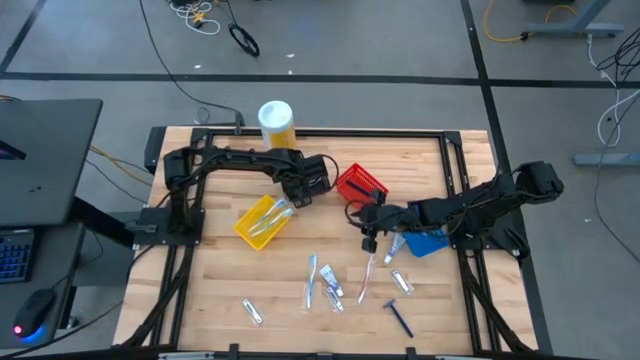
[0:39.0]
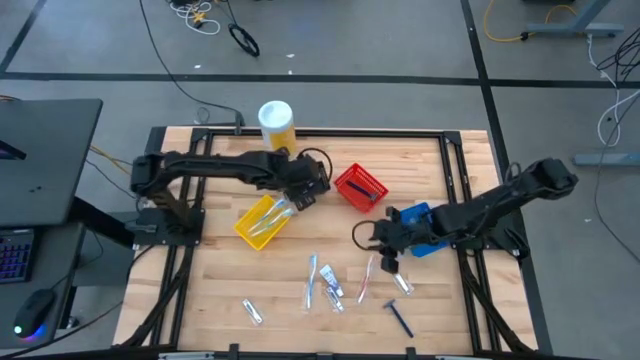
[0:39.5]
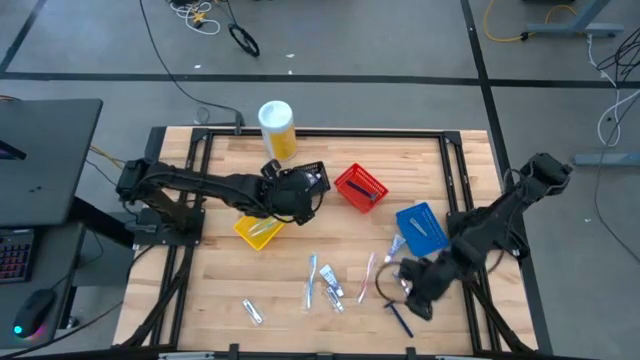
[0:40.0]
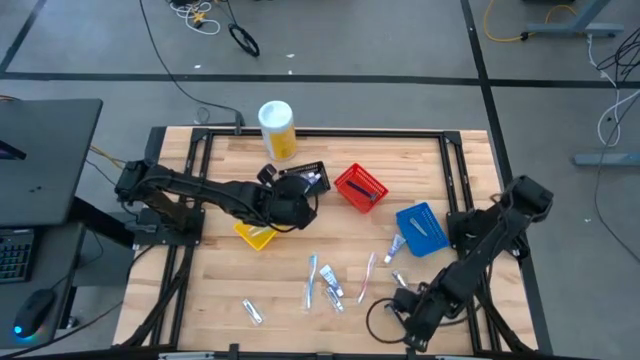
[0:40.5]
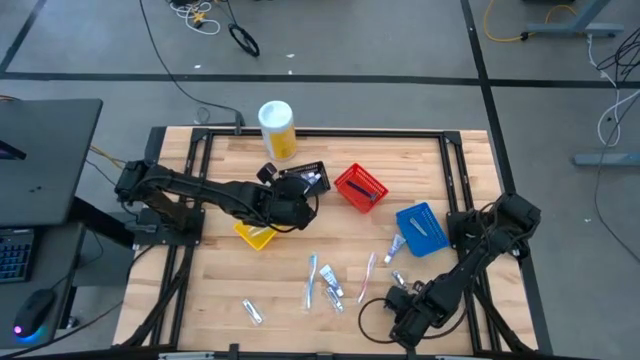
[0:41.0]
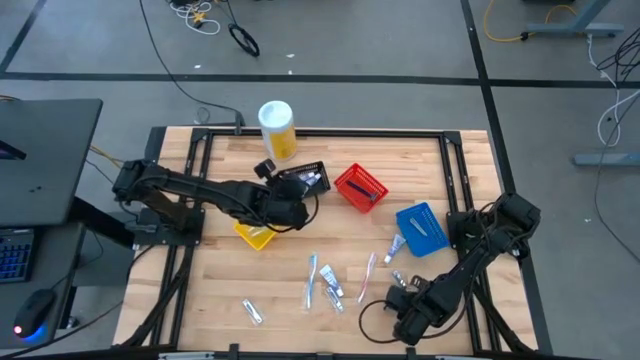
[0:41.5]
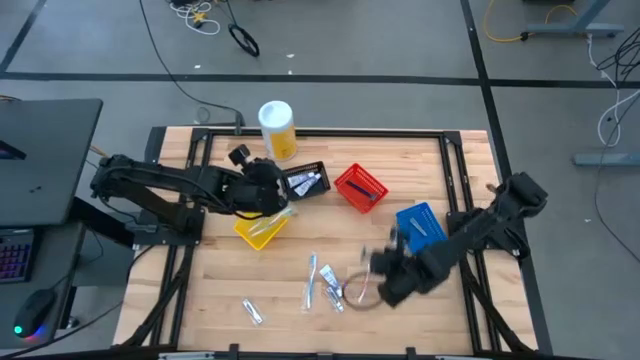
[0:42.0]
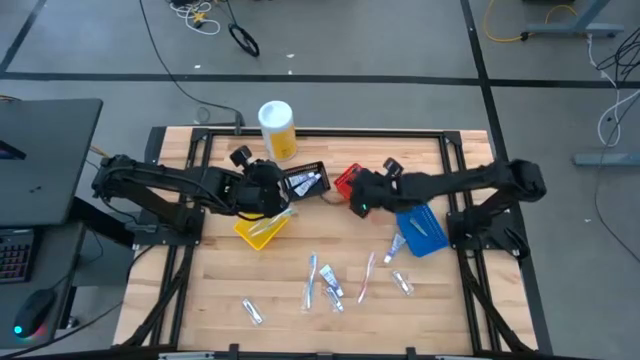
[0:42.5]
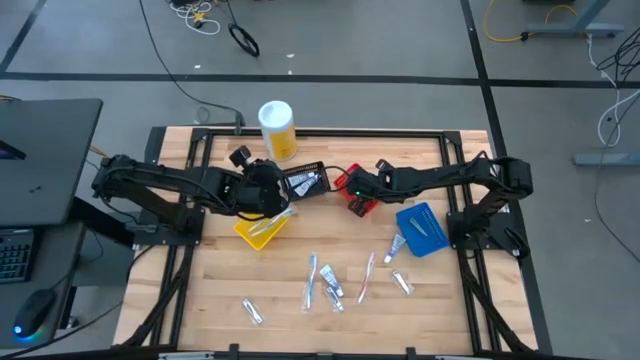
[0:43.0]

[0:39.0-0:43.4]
Task: Pick & Place Travel size toiletries
Put the blue razor into the red basket

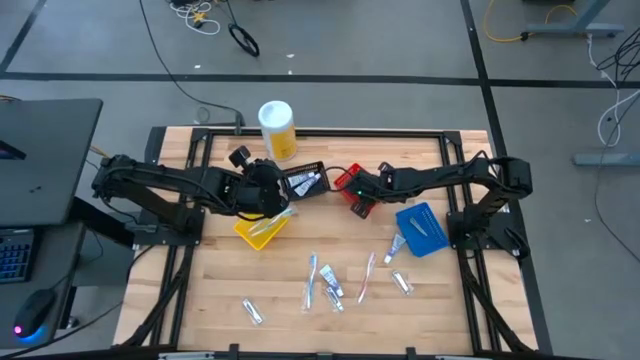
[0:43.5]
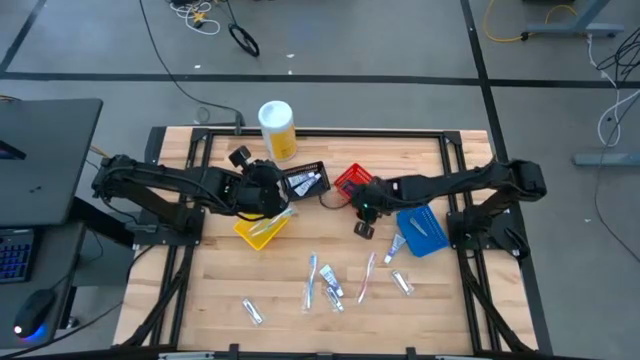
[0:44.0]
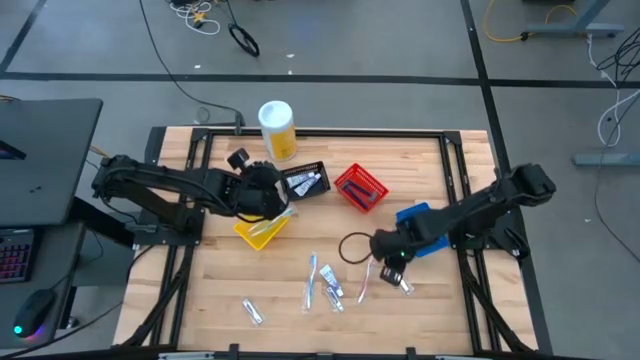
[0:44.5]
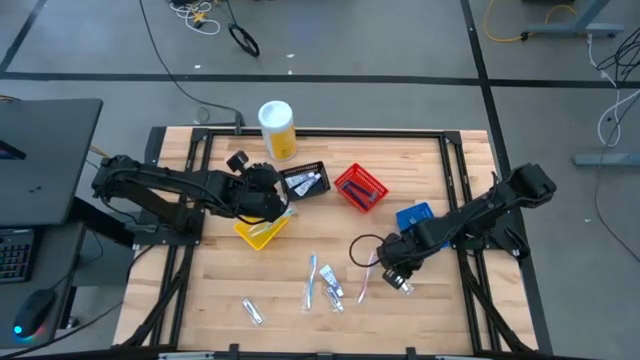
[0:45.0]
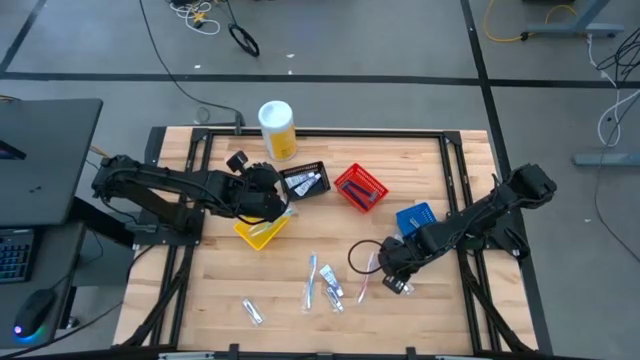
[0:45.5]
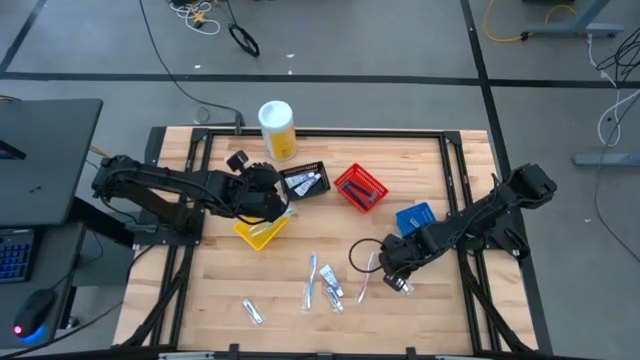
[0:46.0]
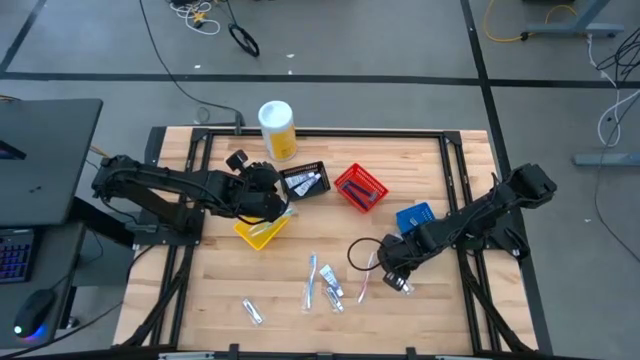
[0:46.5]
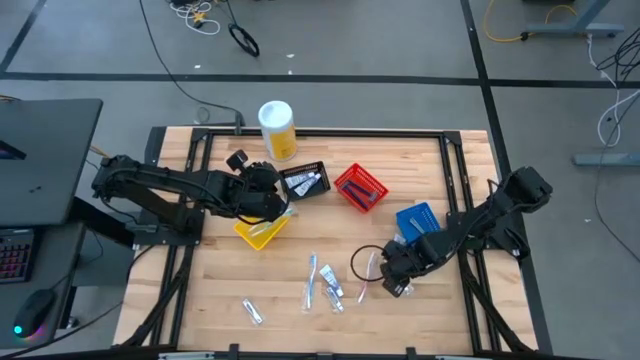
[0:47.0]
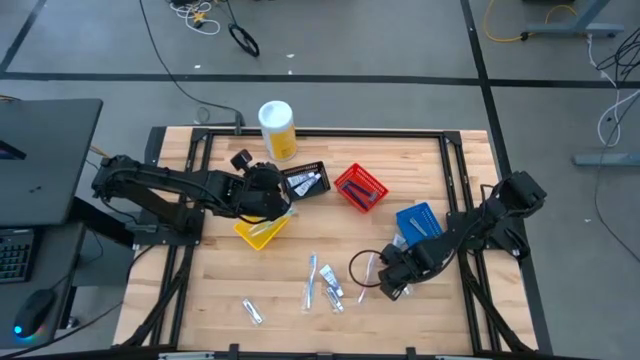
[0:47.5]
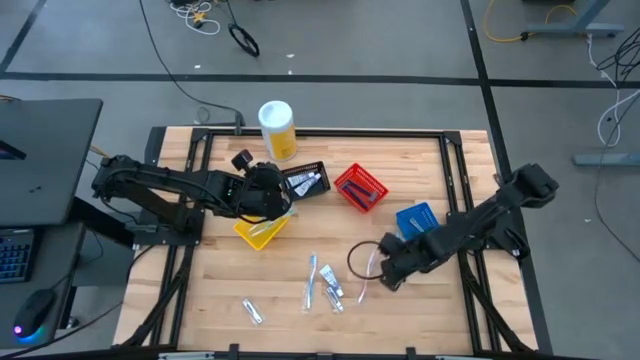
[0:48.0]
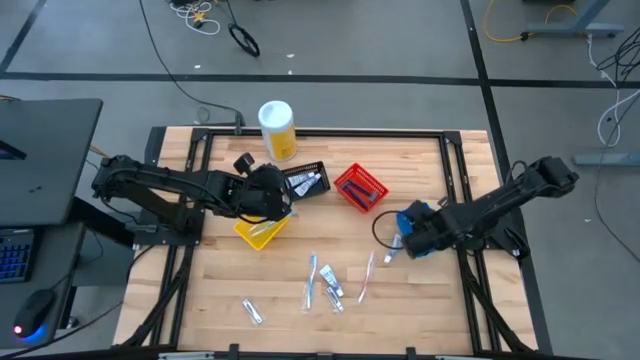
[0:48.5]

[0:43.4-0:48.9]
Put the silver nail cutter into the blue basket

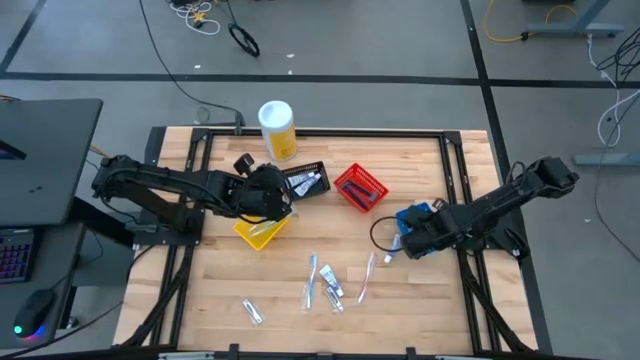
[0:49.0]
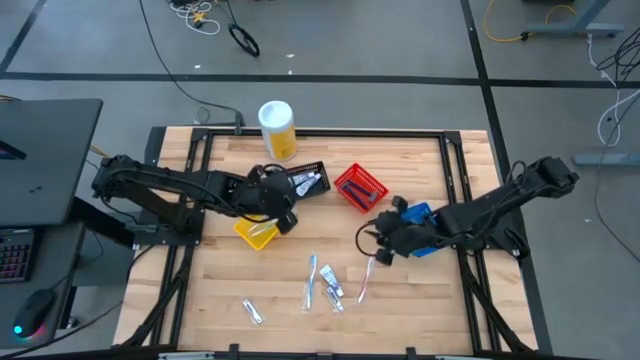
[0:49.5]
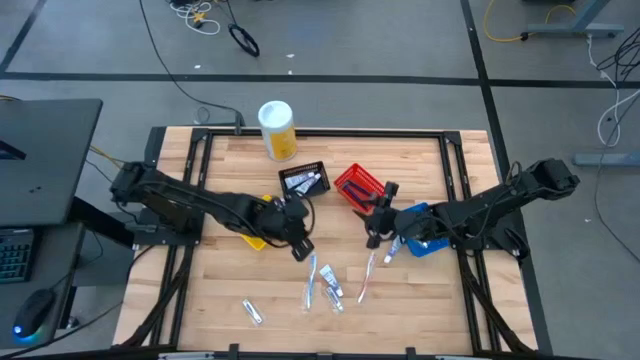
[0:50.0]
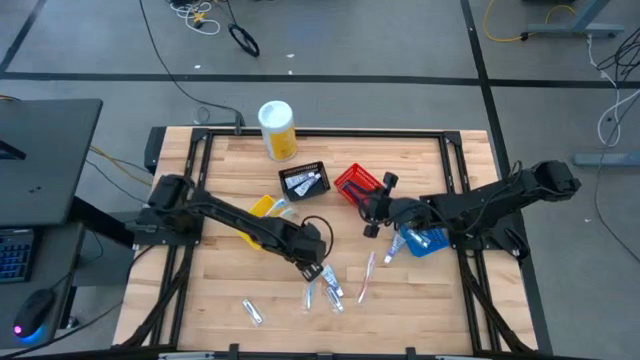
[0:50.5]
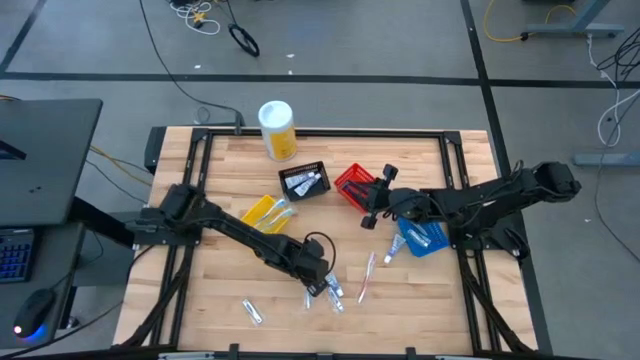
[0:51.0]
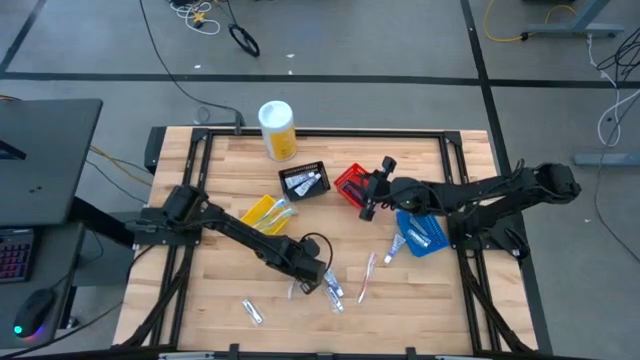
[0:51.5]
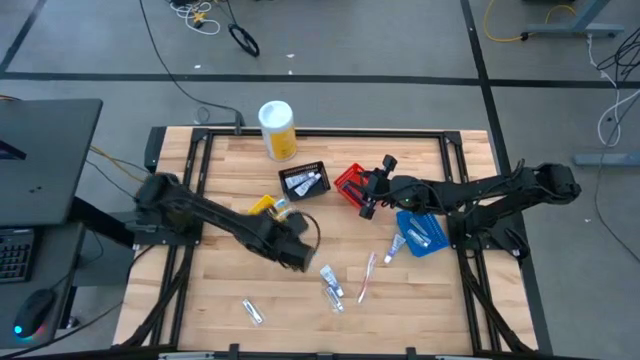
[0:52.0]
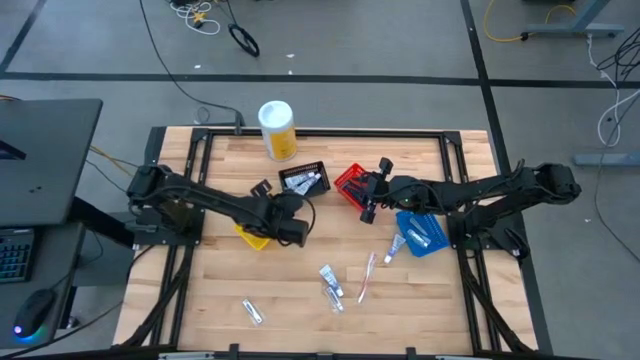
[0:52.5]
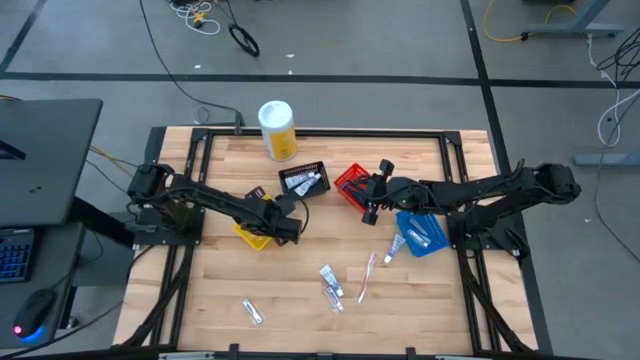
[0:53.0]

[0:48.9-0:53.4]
Put the blue toothbrush into the yellow basket

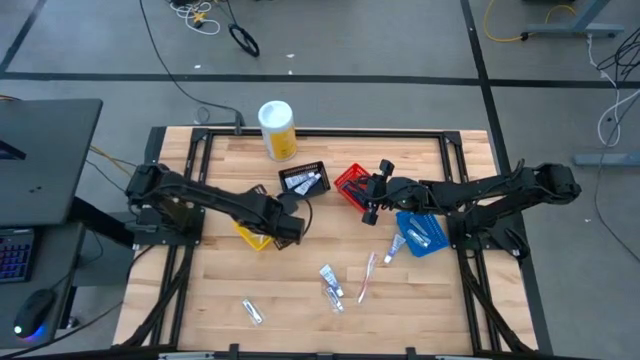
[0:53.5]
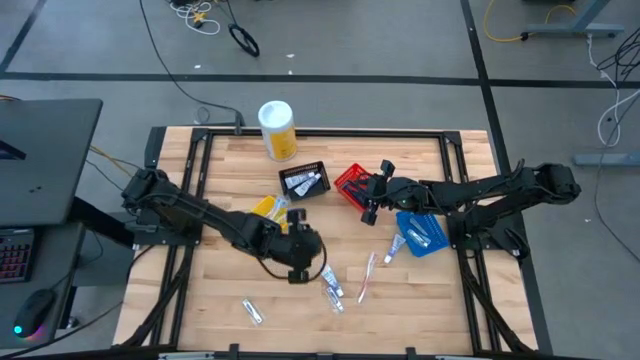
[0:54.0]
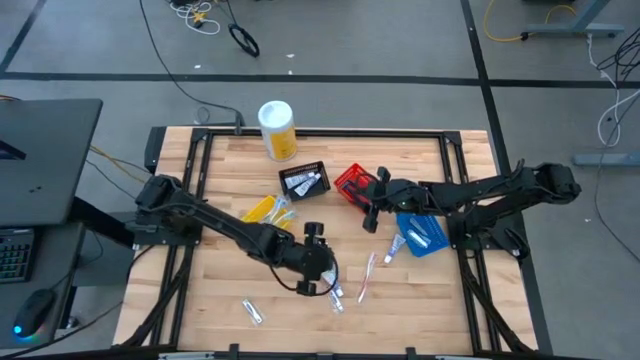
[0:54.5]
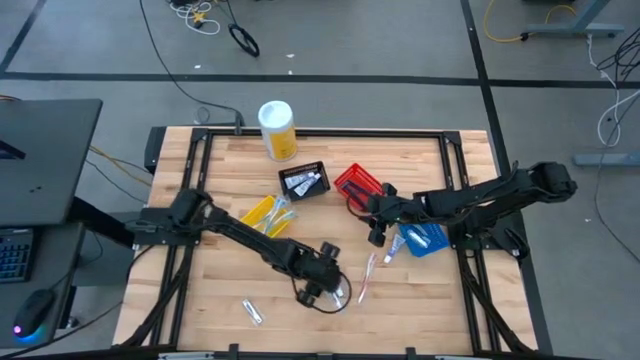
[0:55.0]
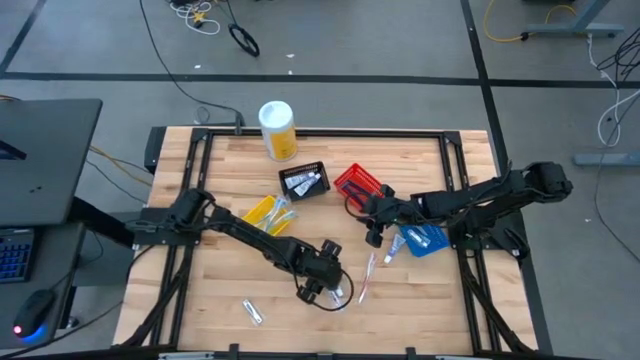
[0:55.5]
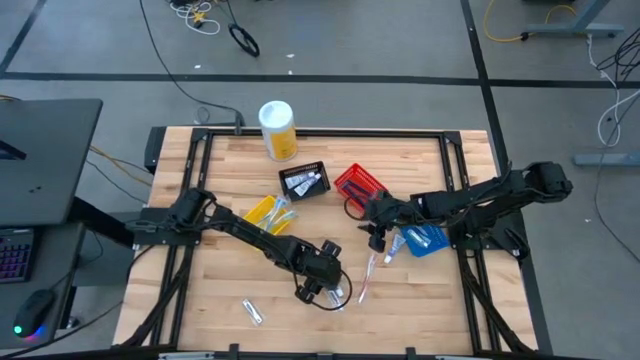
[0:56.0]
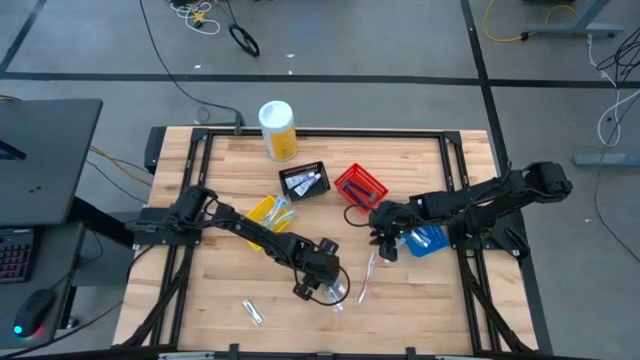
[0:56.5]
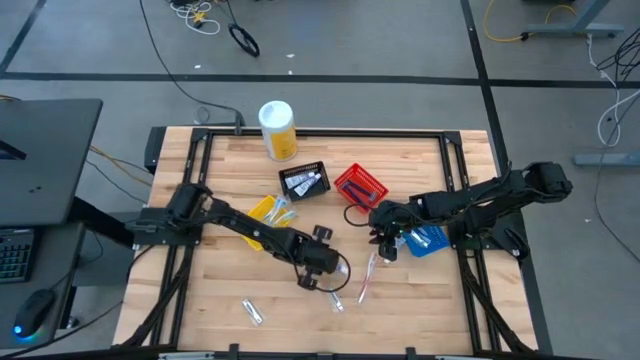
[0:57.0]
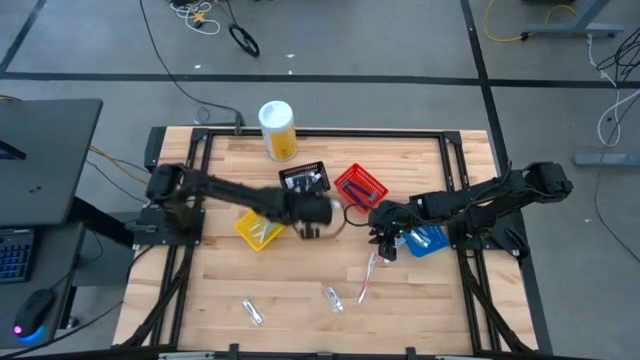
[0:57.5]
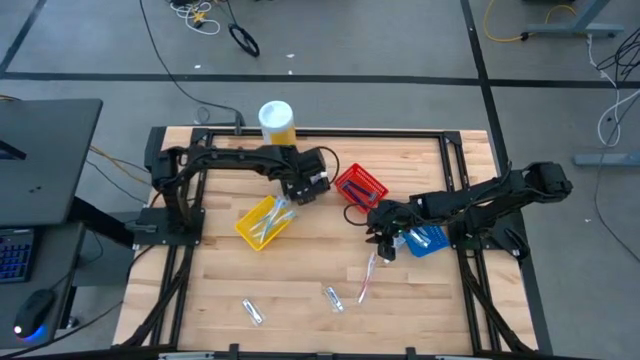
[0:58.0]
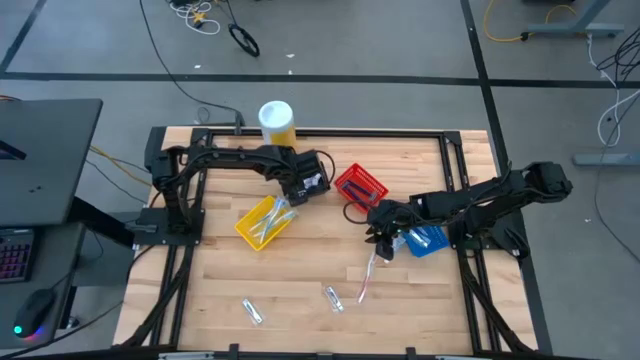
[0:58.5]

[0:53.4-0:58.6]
Put the white toothpaste into the black basket

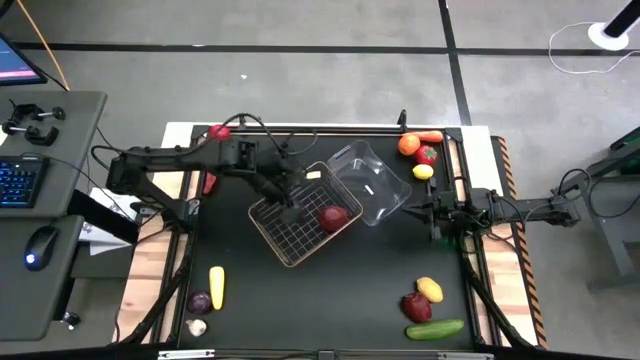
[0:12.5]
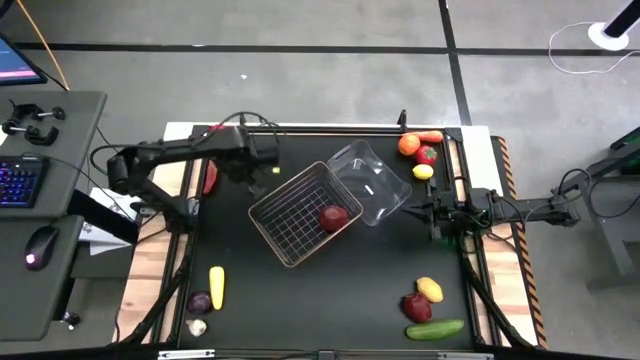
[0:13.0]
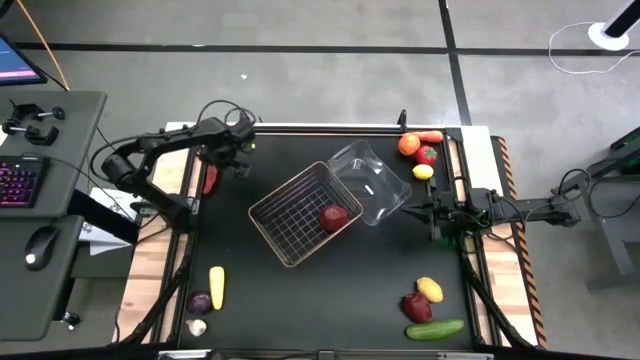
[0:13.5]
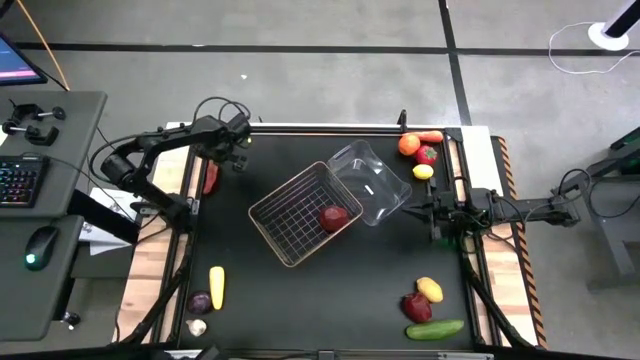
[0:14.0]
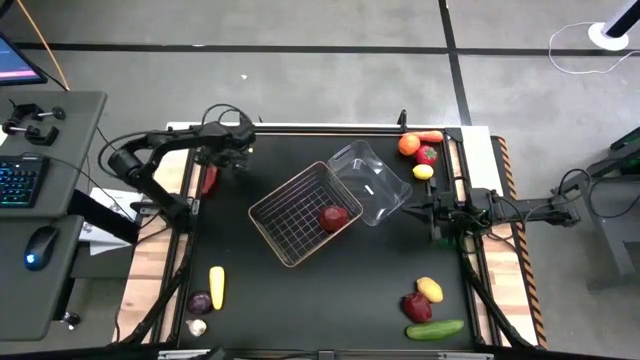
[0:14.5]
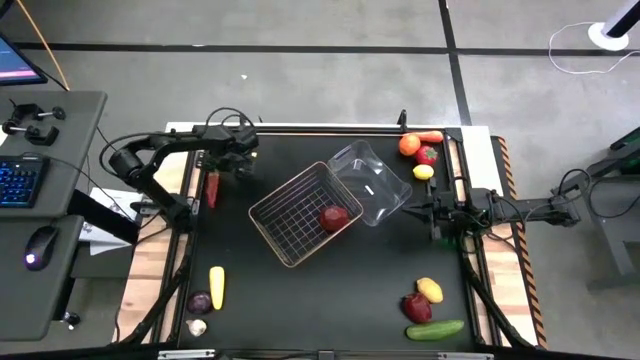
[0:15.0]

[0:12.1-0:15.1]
Task: Sort produce into baskets
Put the chili pepper into the transparent bin
